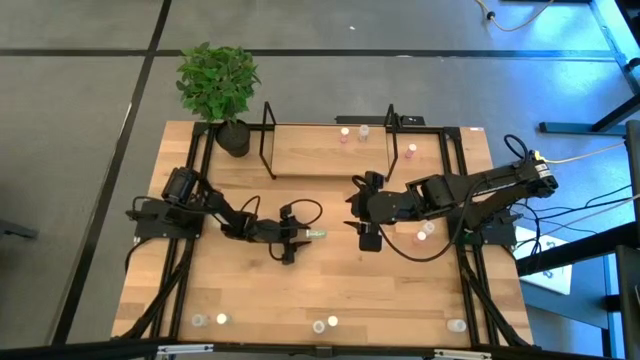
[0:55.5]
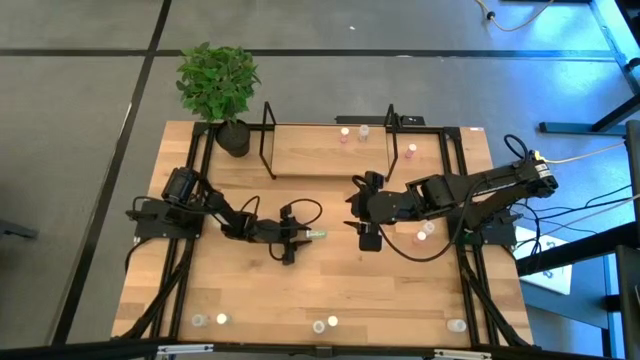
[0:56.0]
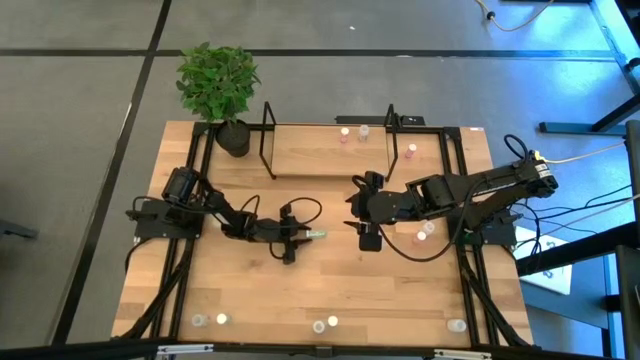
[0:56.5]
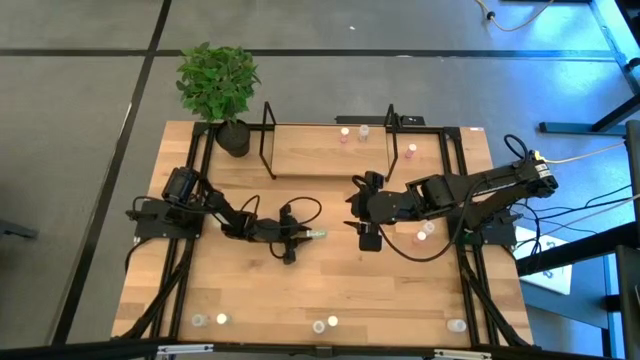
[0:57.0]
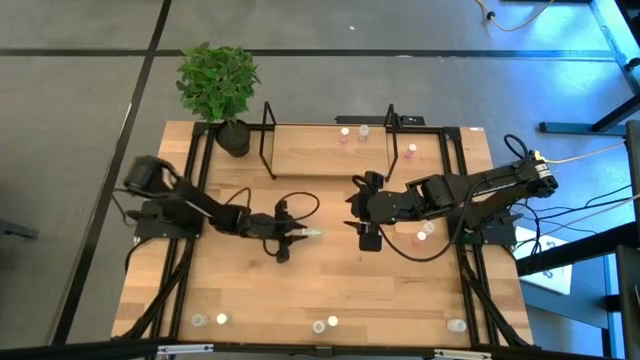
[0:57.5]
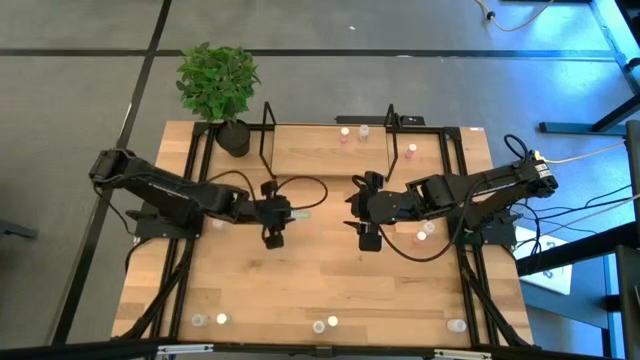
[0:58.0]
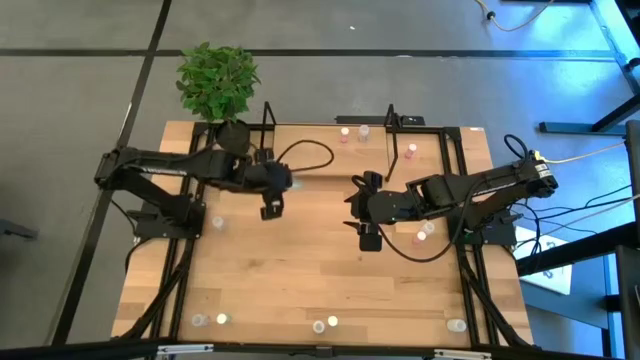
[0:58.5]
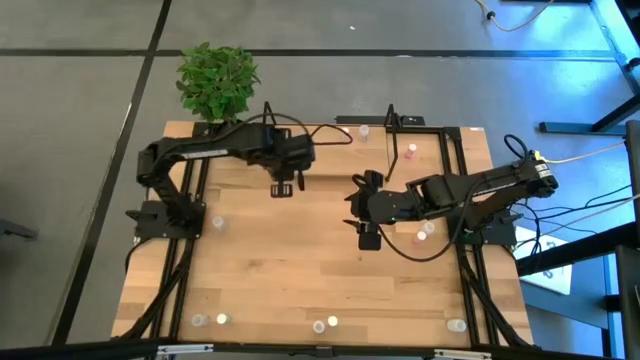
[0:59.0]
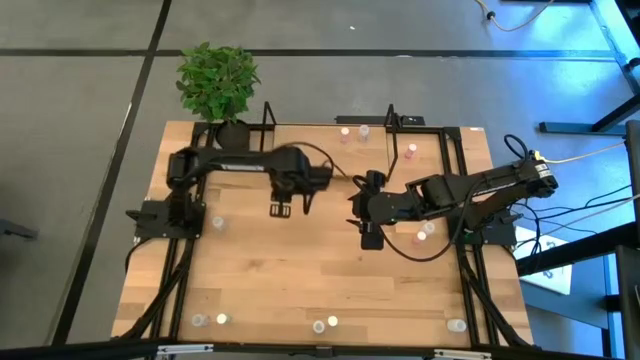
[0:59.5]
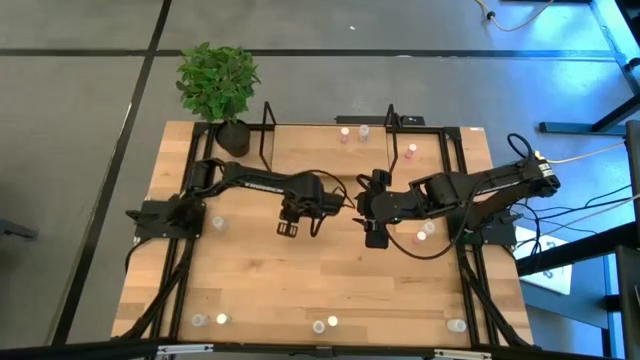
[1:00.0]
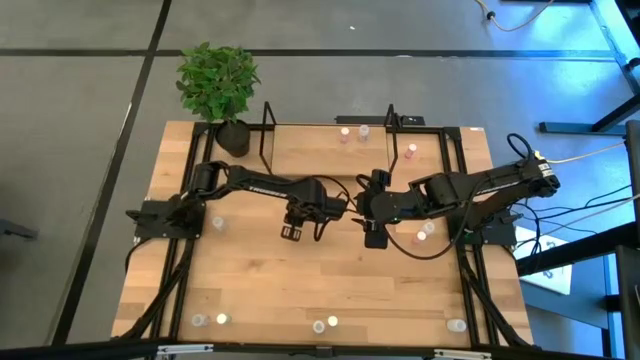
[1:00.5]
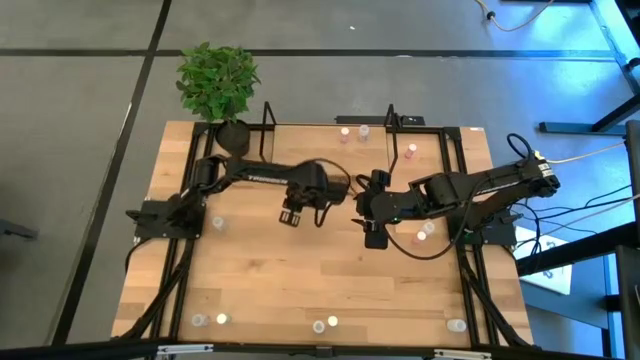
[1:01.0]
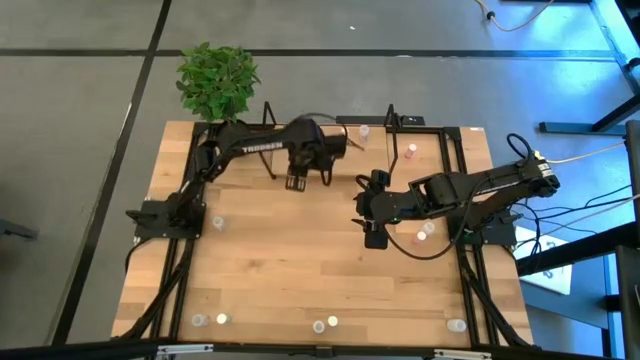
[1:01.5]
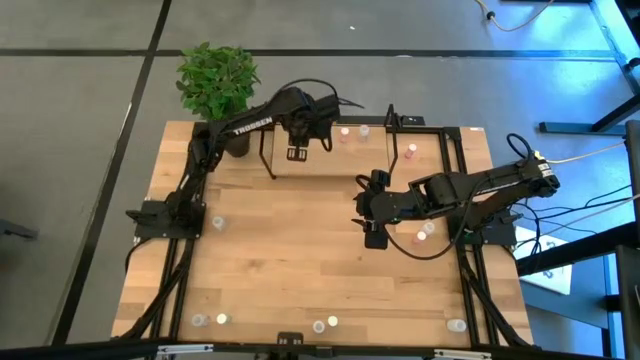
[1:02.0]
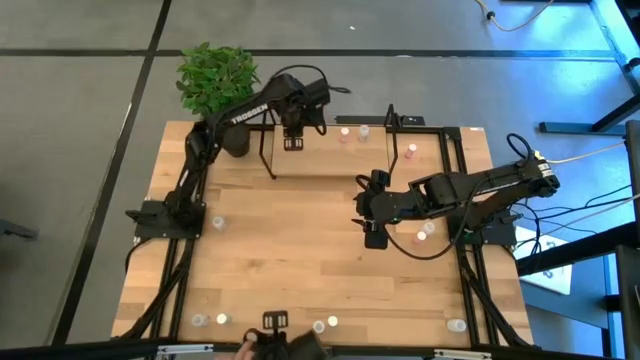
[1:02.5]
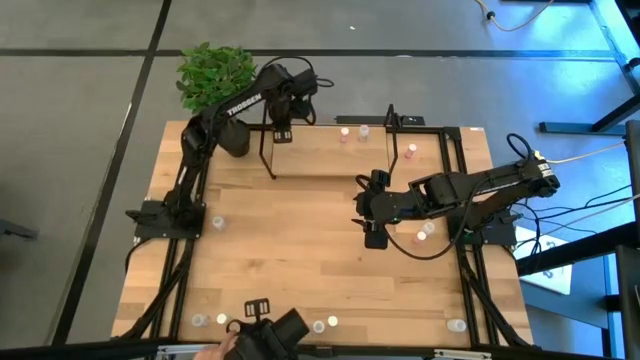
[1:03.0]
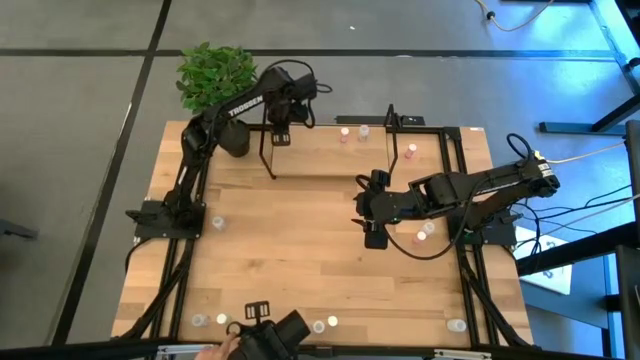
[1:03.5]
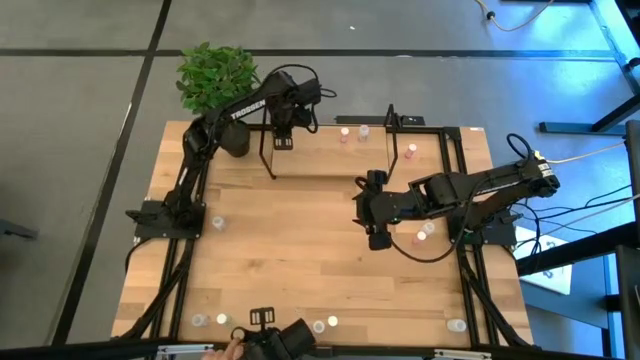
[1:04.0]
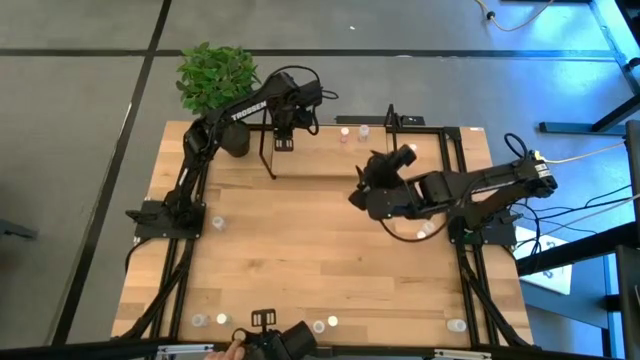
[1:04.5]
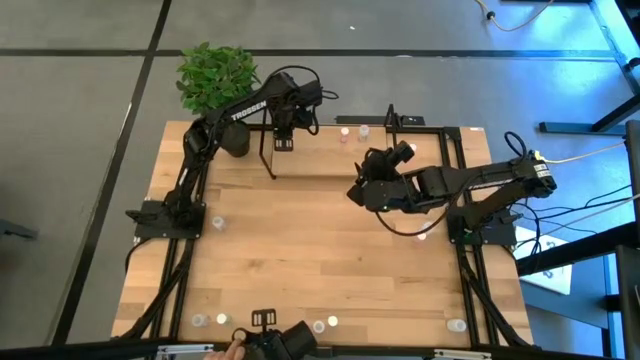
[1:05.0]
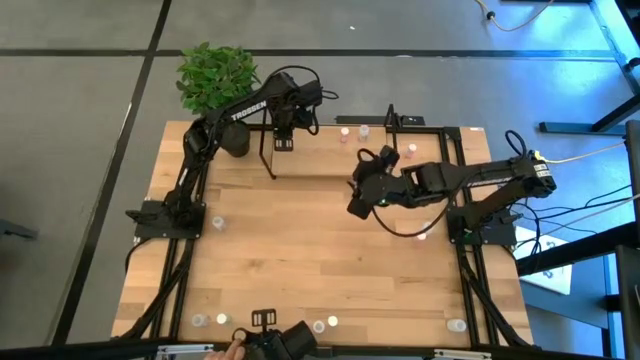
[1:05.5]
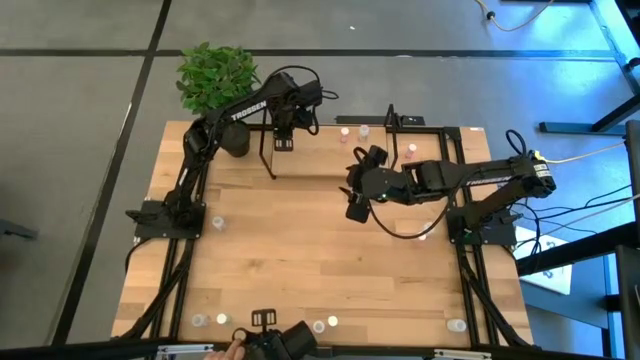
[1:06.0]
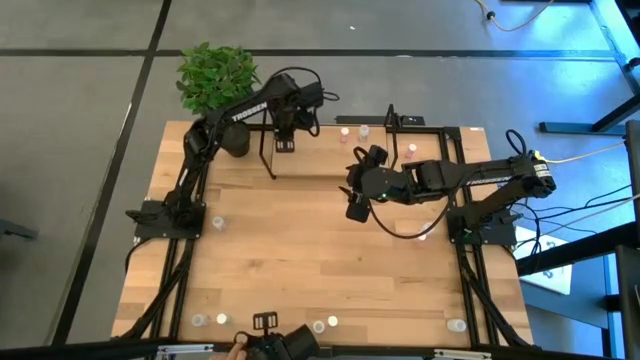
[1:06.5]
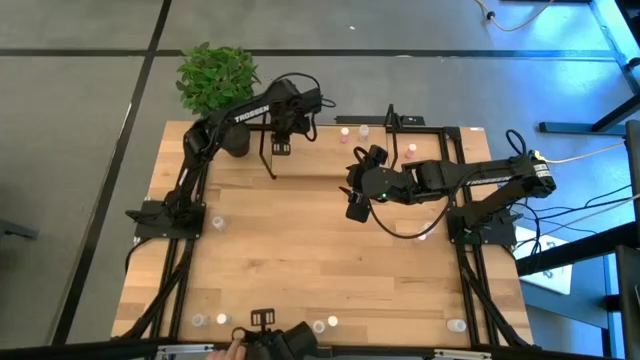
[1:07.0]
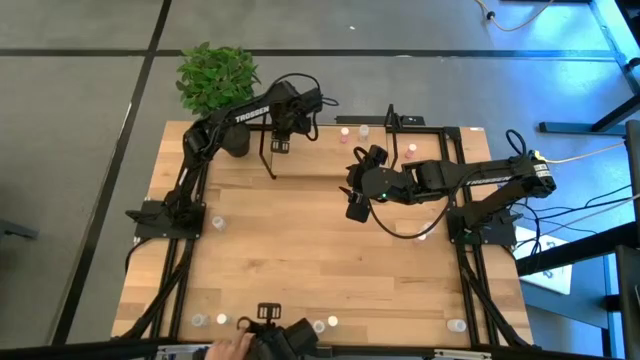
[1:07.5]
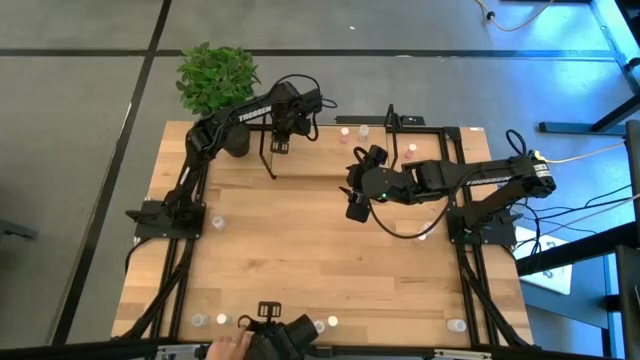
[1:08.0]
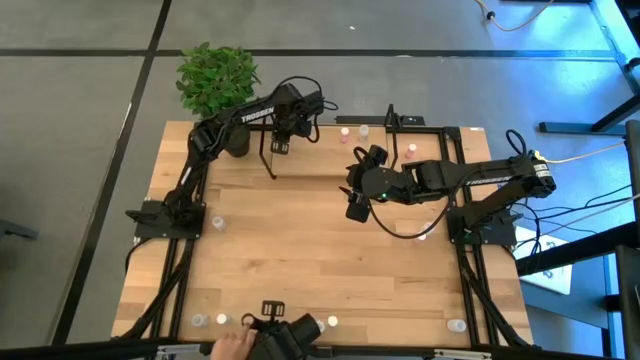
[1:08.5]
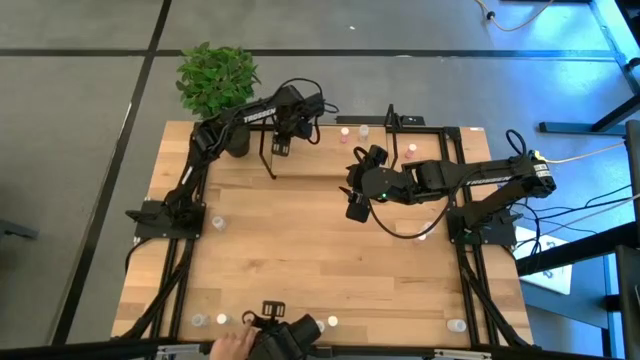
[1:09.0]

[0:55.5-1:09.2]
Task: Pick and place medicine bottles onto shelf by color
Put the top blue medicine bottle on the shelf

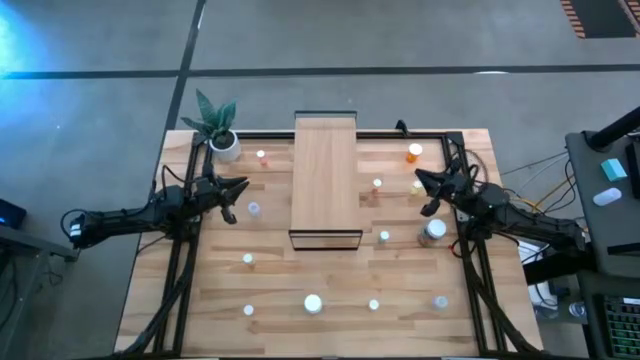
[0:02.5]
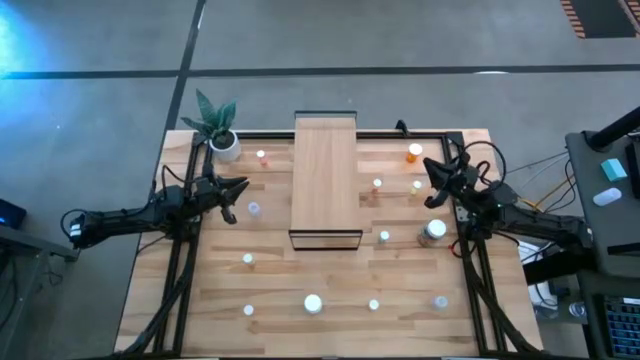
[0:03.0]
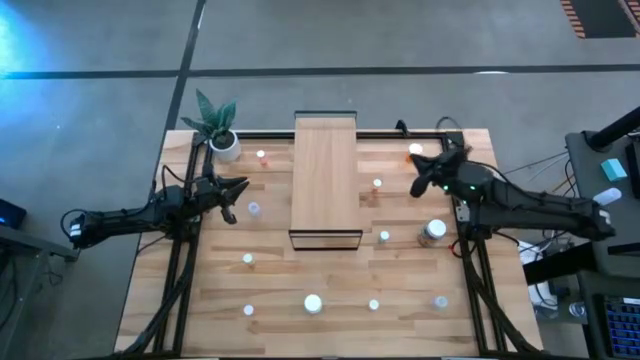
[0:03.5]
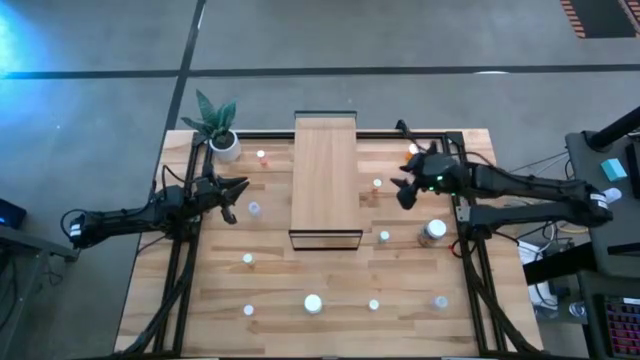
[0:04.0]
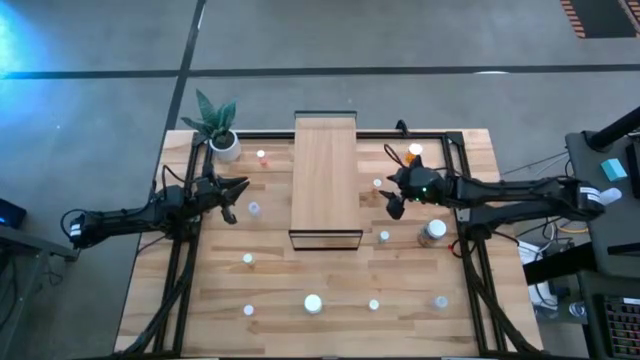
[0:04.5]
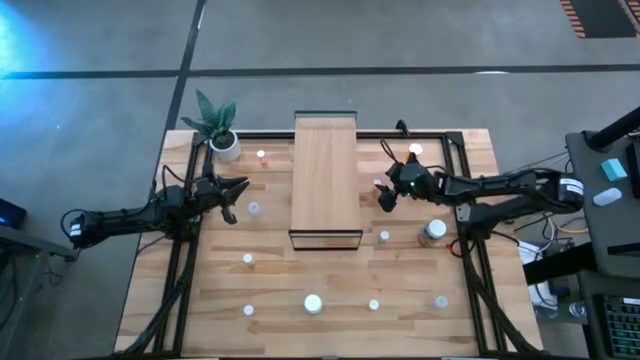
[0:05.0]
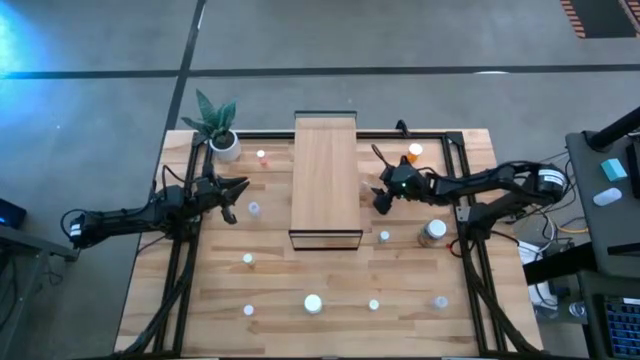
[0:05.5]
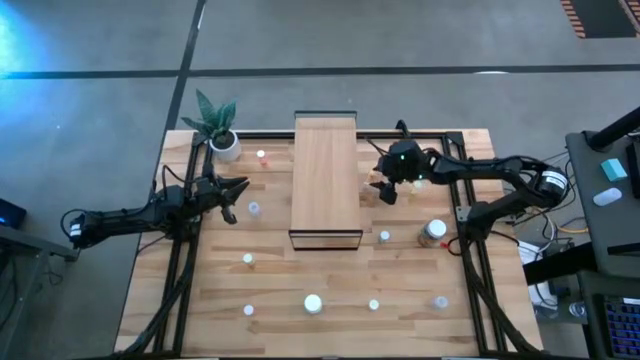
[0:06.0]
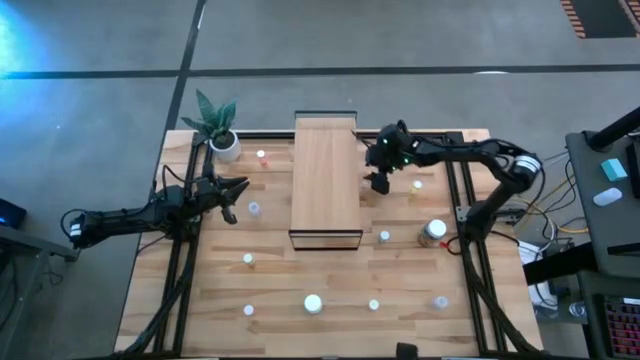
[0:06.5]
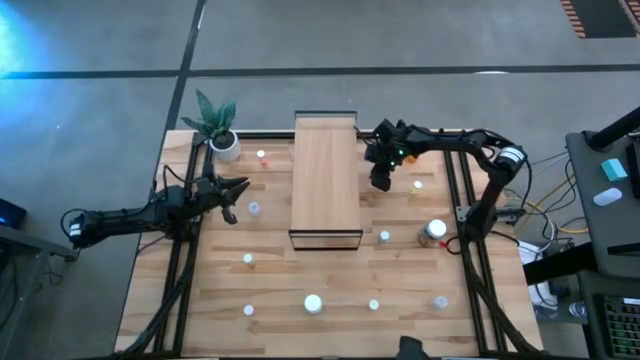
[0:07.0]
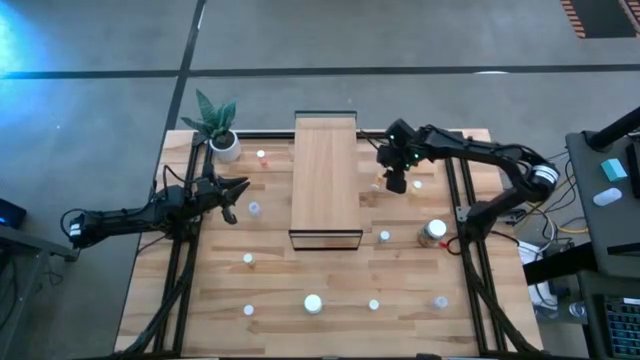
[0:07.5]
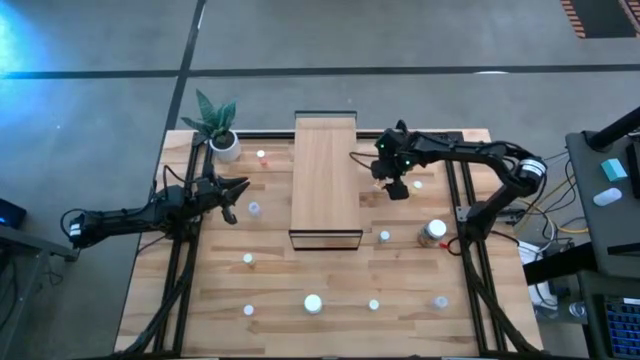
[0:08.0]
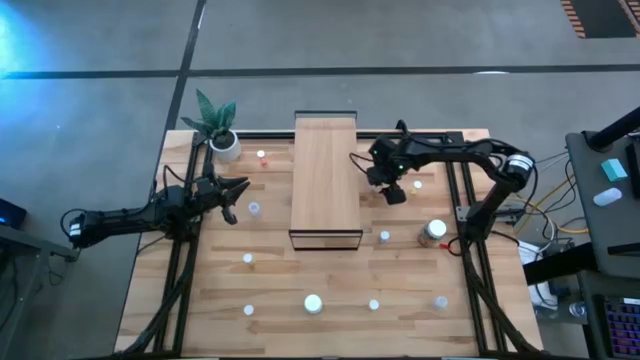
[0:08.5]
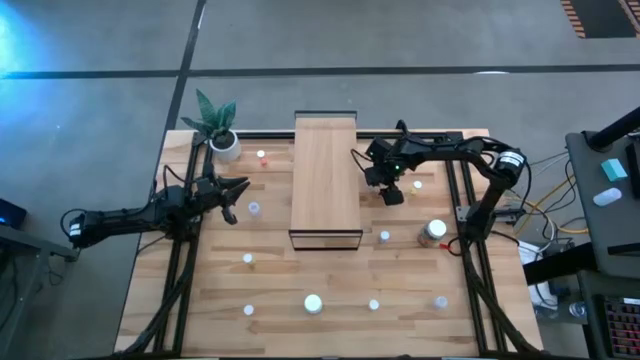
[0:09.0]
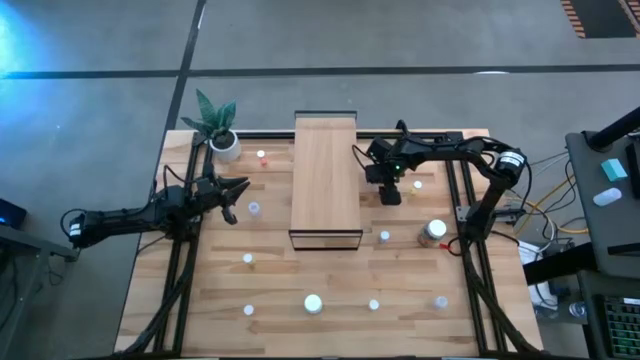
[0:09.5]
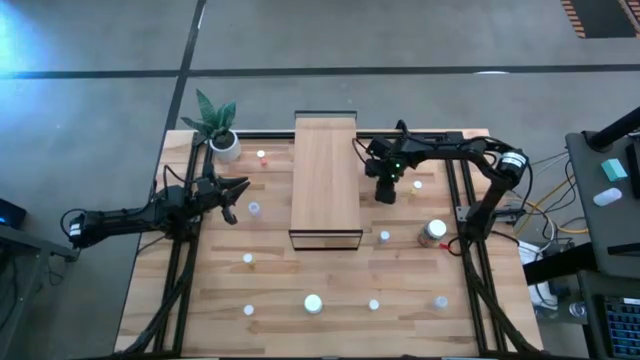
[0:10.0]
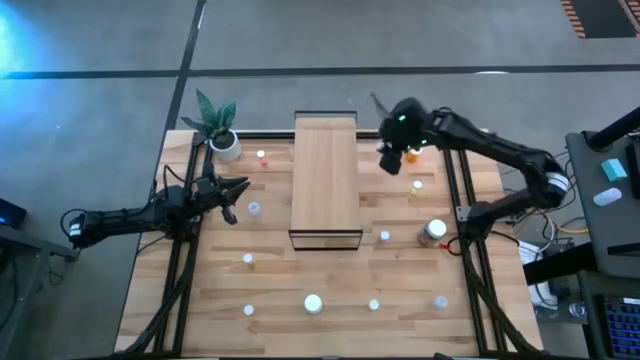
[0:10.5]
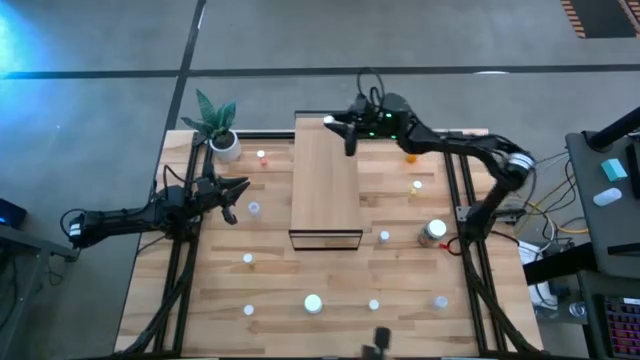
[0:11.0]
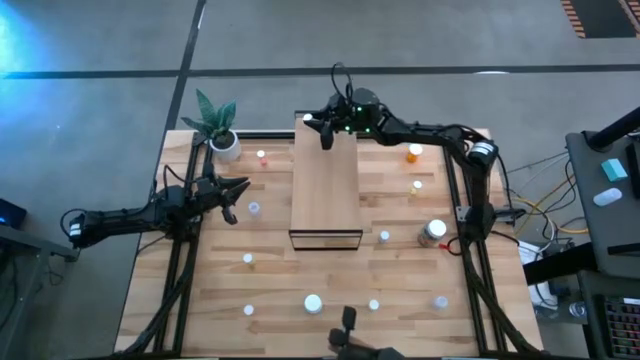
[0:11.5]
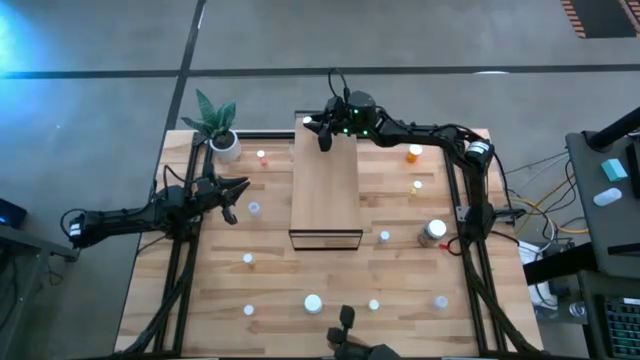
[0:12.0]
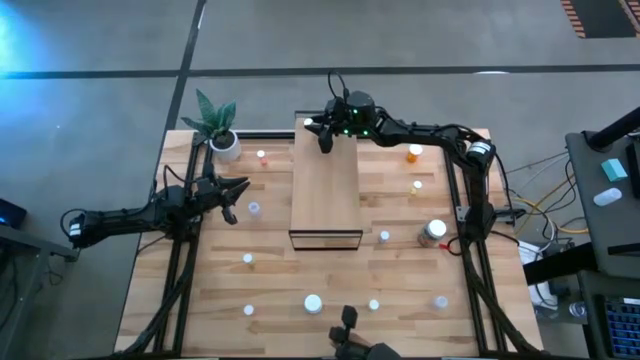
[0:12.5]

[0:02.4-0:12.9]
Task: Pick and place medicine bottles onto shelf by color
Put the top left yellow pill bottle on the shelf
